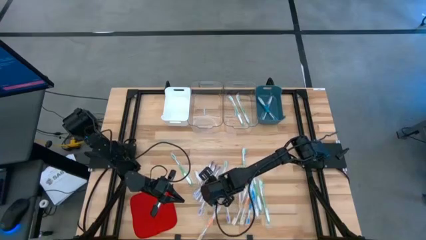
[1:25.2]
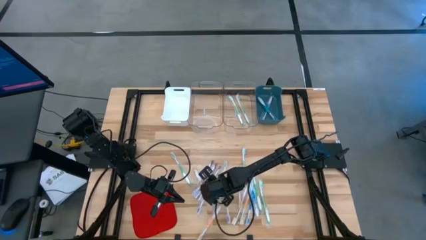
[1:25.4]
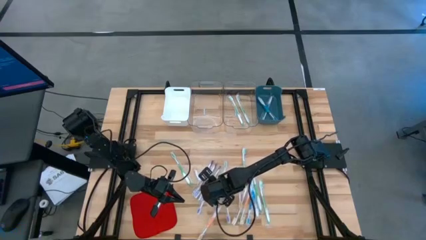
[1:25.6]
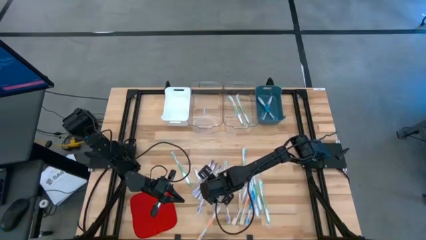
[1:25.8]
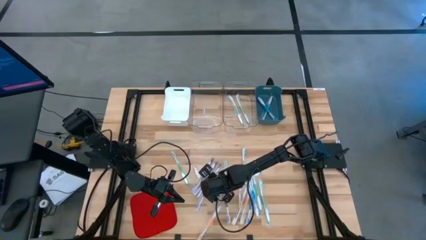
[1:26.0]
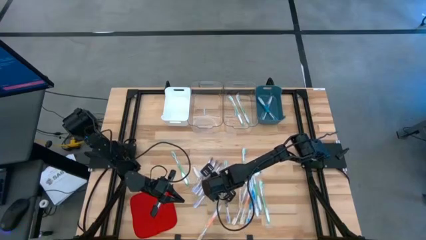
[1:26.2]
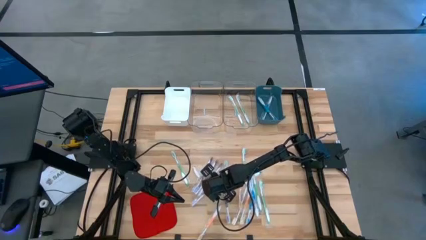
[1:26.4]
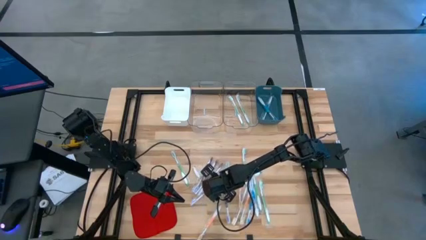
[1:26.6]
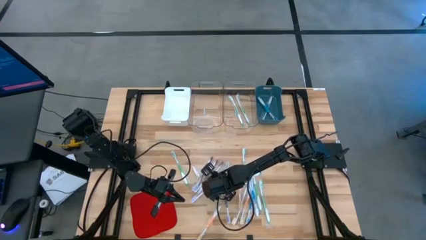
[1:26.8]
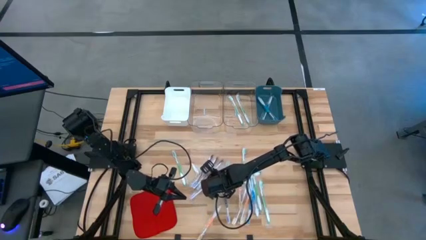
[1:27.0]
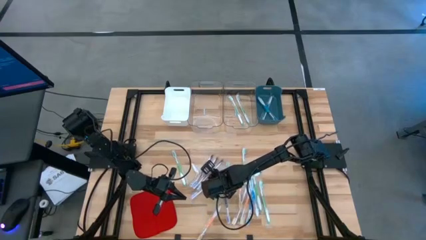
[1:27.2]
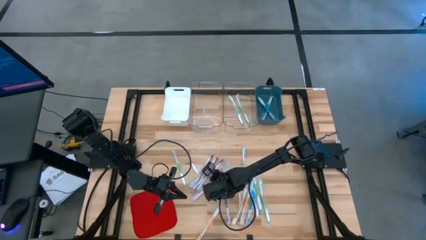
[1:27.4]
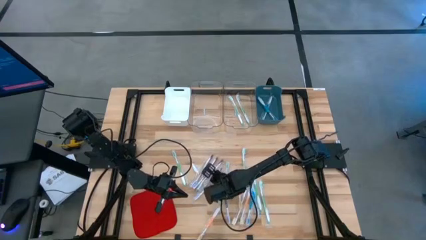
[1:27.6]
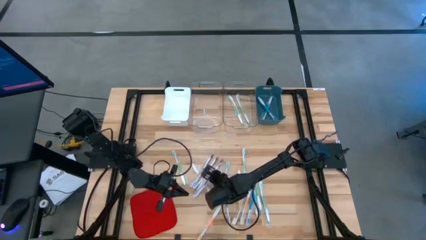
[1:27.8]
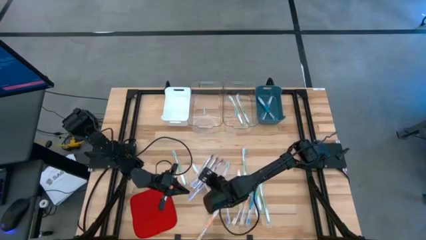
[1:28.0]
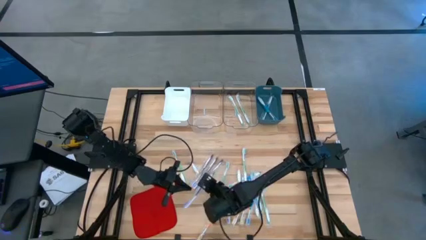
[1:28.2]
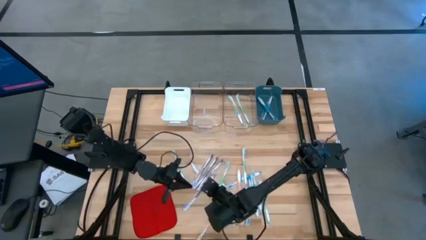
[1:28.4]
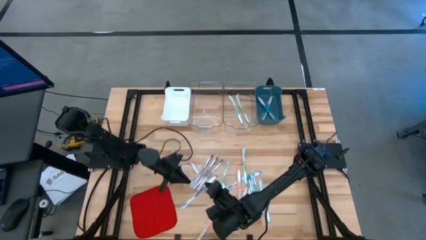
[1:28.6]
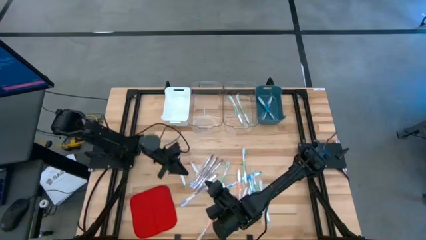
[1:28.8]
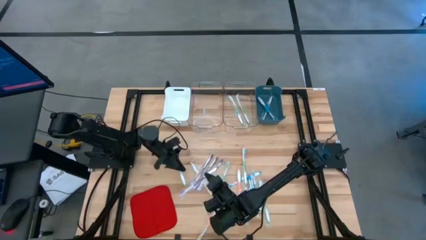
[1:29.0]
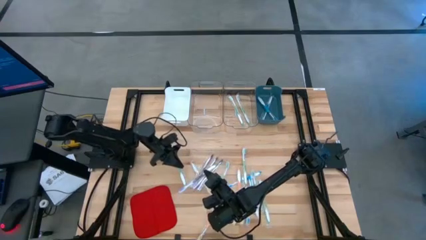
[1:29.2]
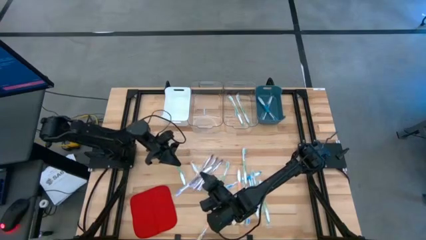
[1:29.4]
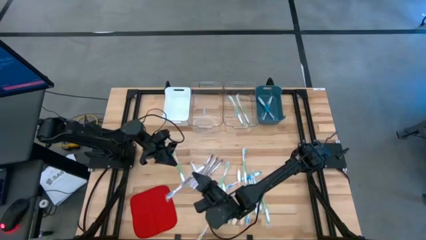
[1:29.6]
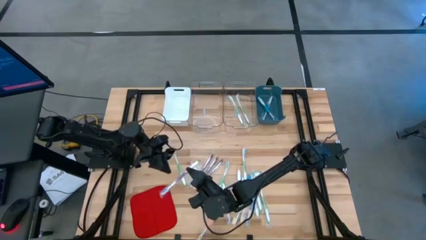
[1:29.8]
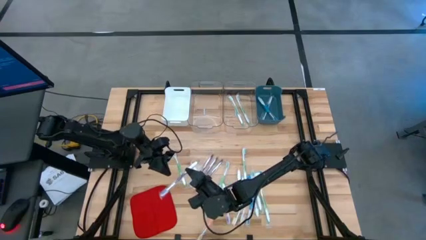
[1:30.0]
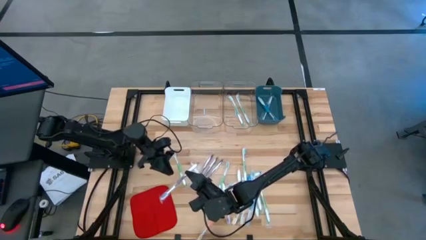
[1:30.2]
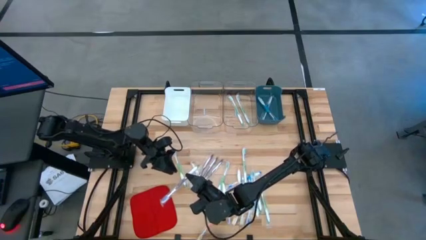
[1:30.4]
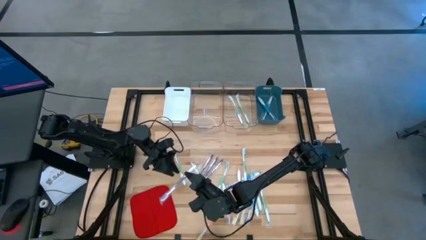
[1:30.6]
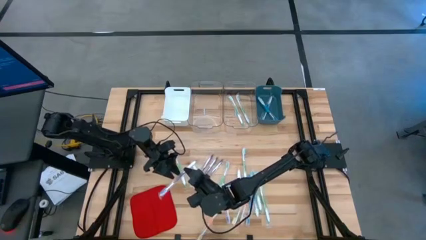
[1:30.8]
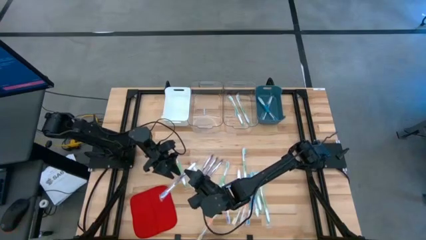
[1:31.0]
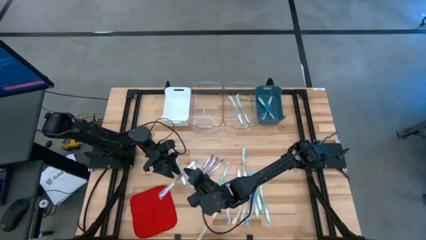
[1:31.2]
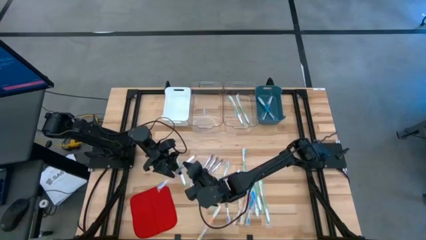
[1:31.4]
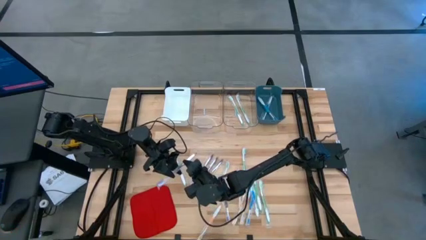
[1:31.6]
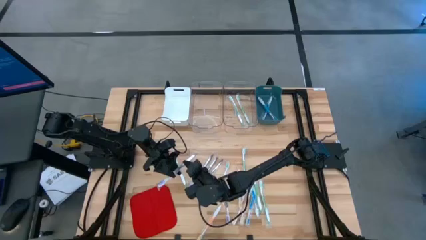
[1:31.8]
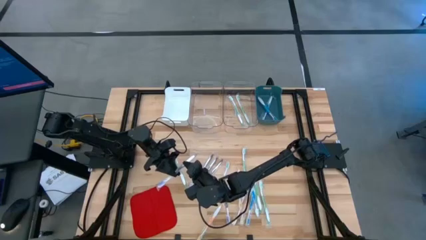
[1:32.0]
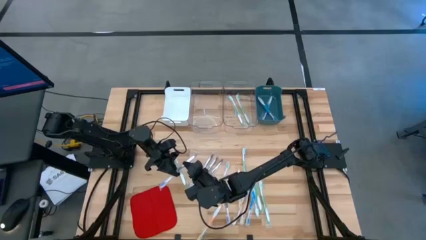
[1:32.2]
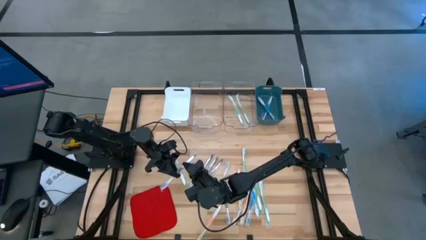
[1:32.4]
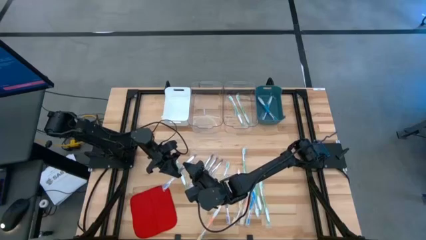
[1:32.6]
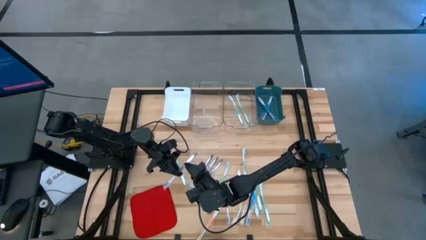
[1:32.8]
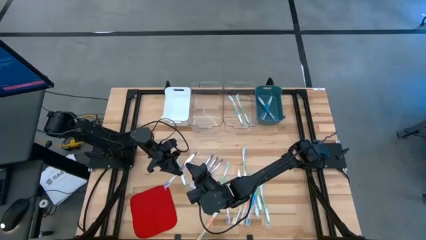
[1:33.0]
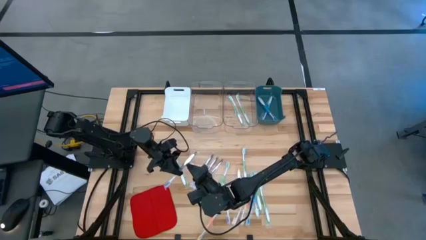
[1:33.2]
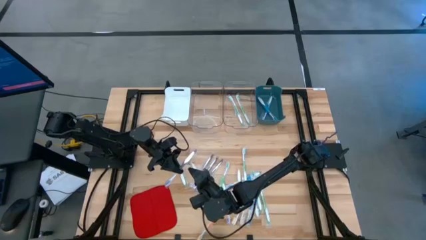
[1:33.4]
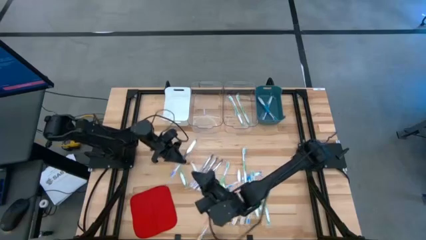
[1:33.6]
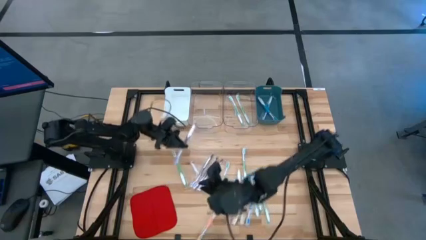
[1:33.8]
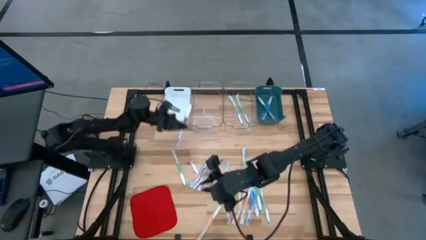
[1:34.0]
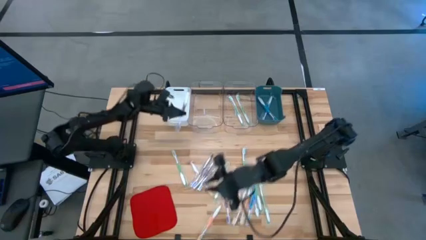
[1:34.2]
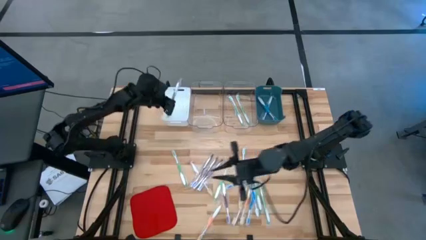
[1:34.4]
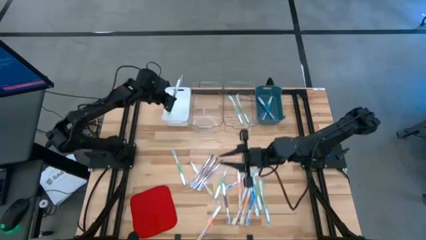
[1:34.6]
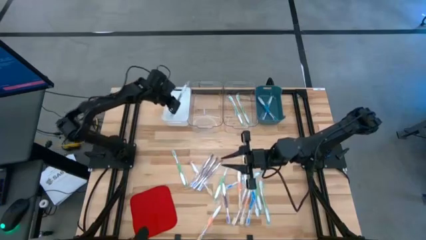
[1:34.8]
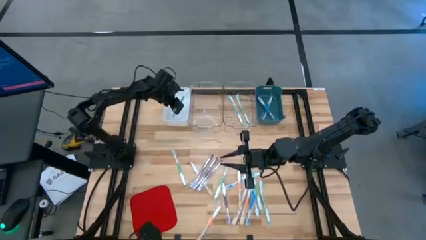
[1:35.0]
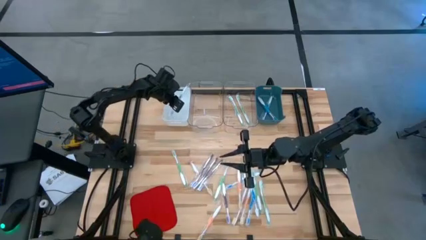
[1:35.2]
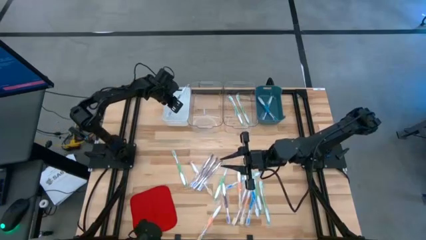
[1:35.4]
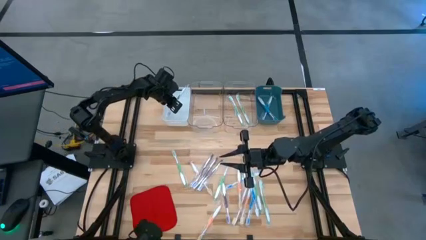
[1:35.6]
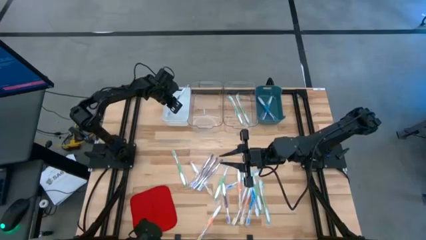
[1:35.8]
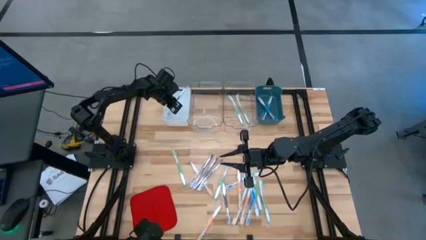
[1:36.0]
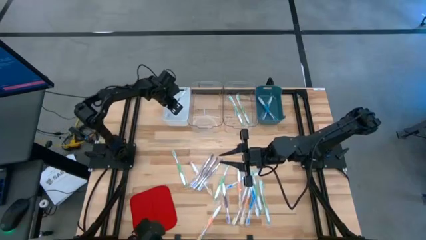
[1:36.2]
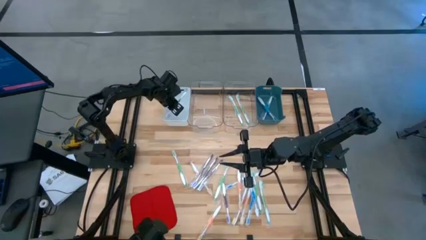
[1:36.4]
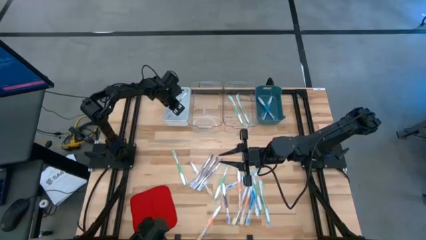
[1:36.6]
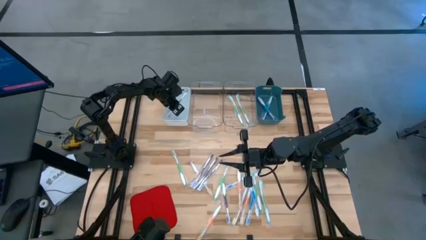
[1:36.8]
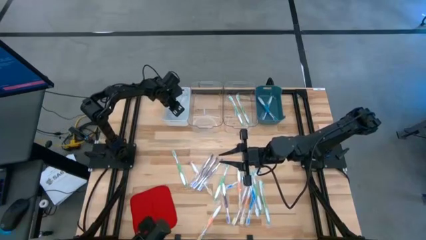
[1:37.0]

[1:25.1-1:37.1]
Task: Pick & Place Toothbrushes
Put the violet toothbrush into the white bin
